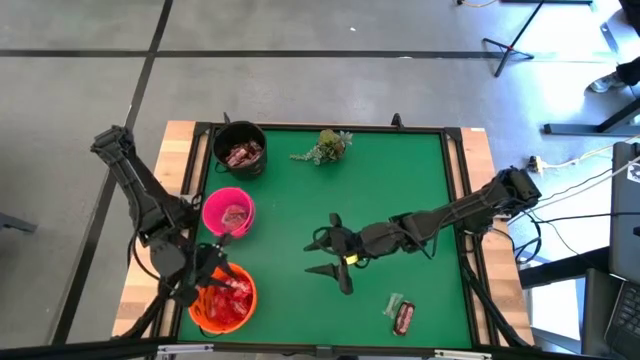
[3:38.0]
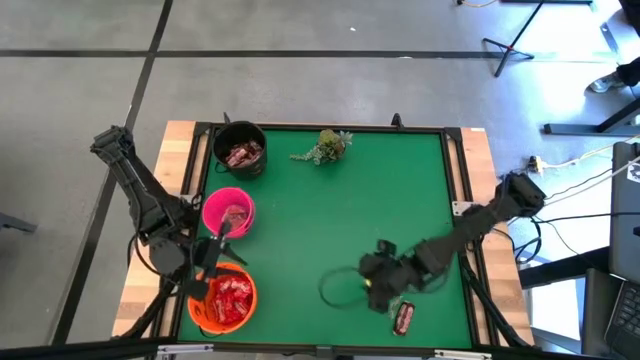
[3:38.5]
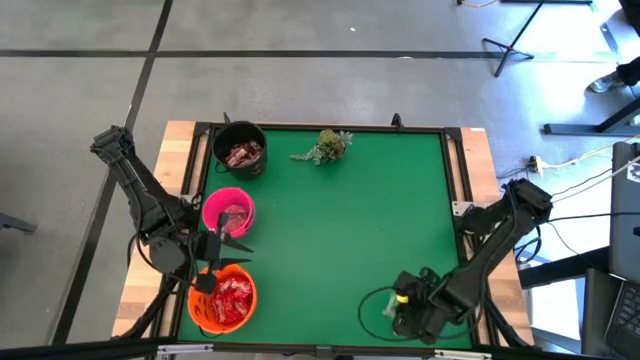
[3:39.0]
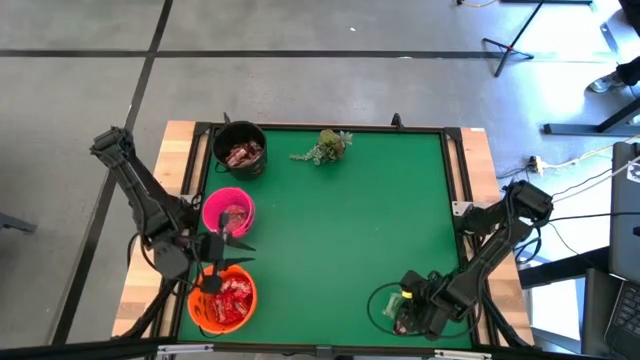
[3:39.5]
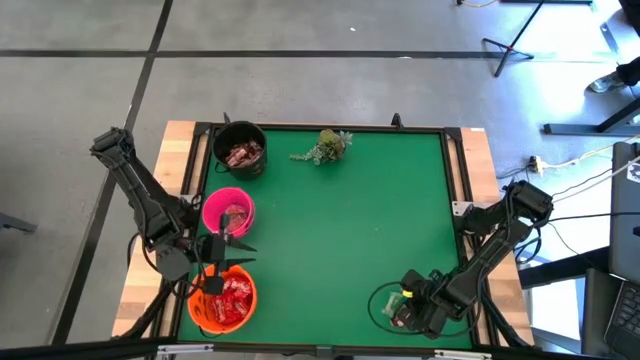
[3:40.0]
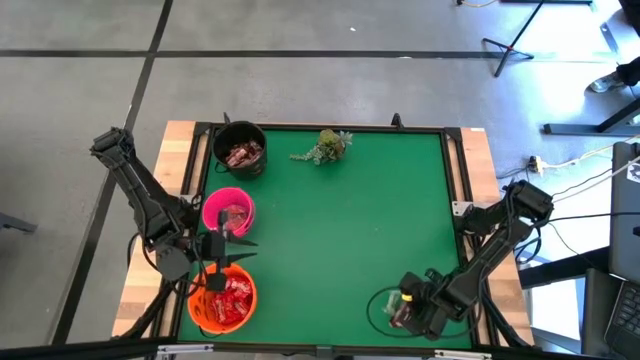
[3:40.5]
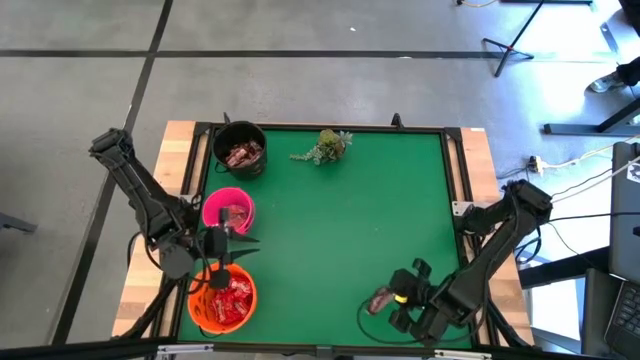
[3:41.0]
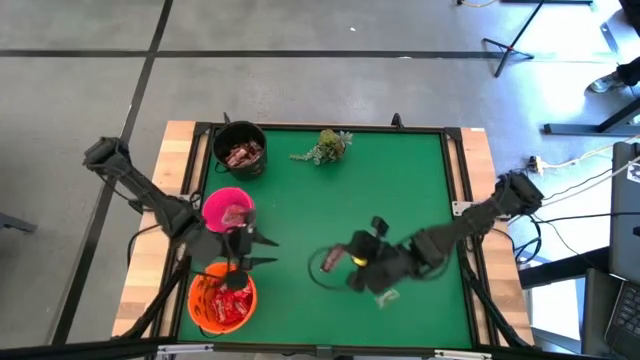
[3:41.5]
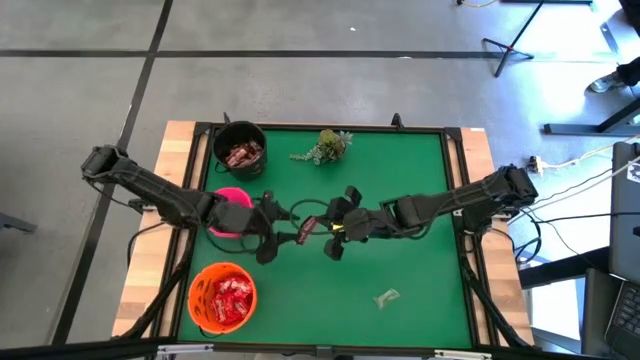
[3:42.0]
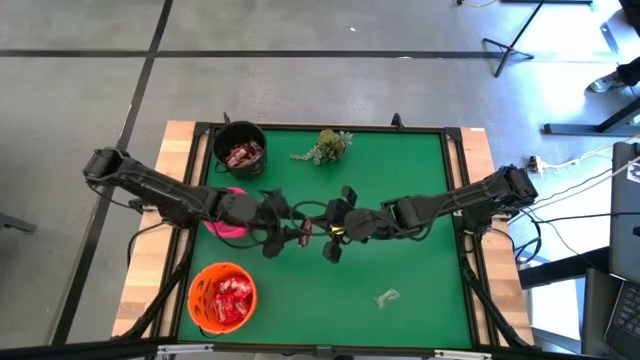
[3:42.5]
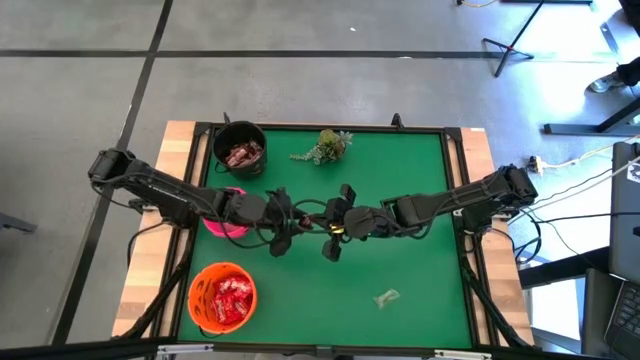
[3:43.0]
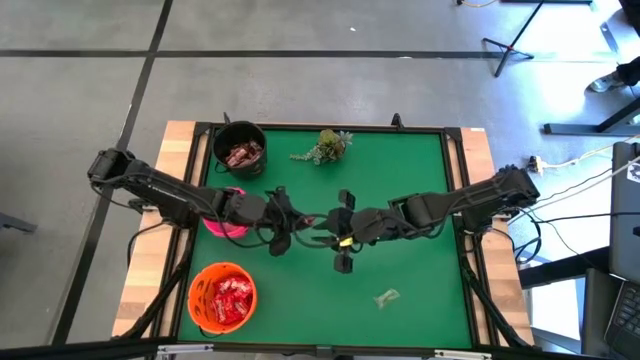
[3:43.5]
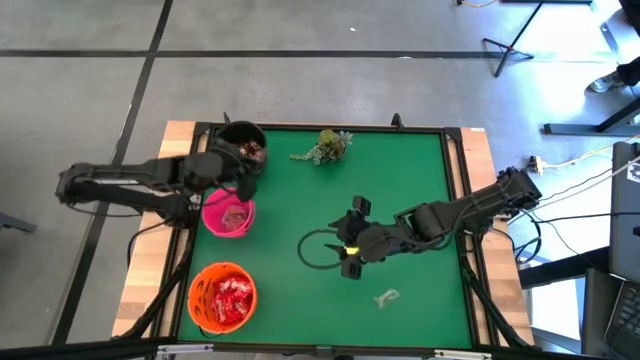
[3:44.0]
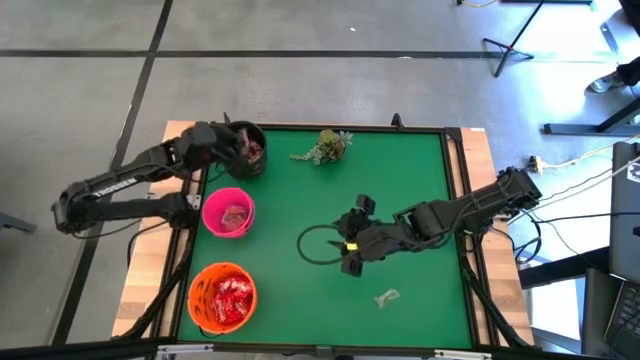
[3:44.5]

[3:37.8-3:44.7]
Task: Sort candy
Put the brown chocolate into the black bucket

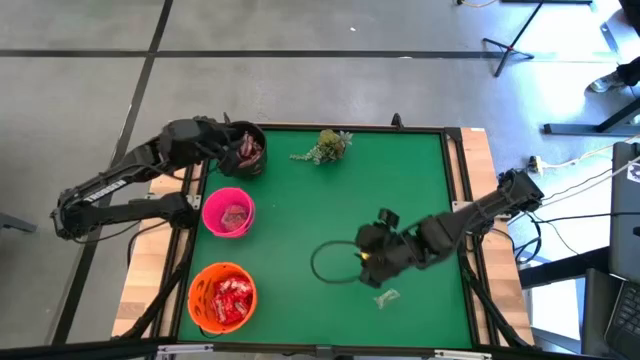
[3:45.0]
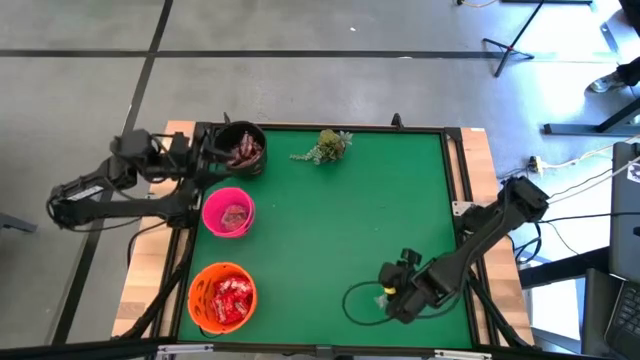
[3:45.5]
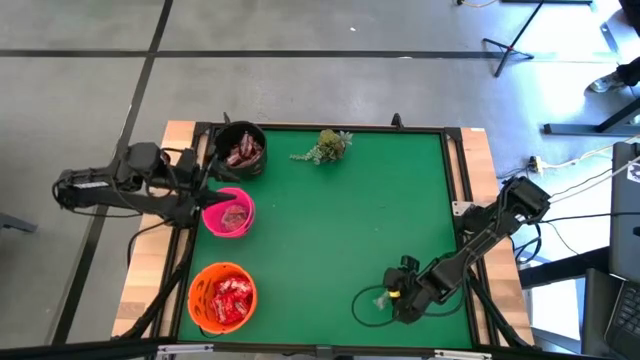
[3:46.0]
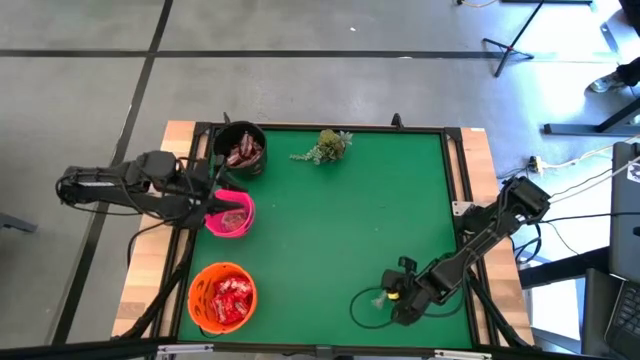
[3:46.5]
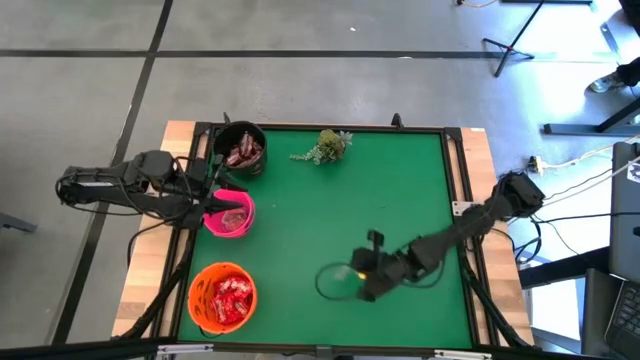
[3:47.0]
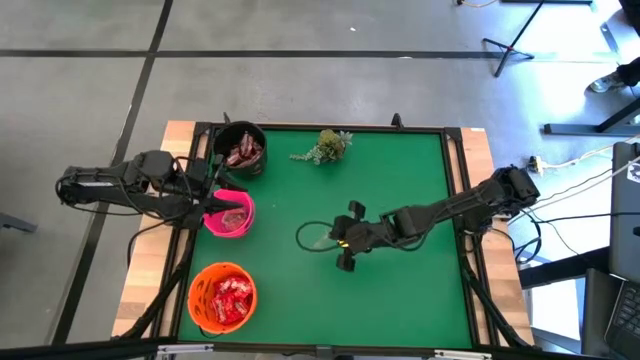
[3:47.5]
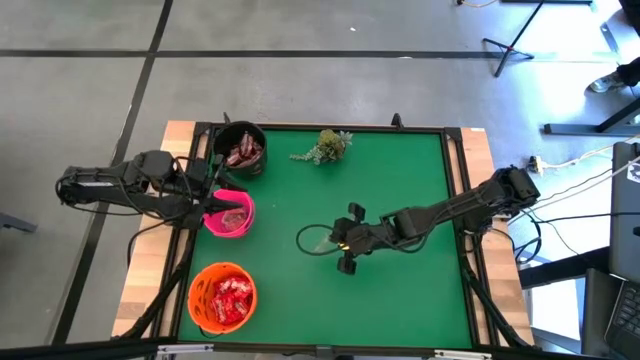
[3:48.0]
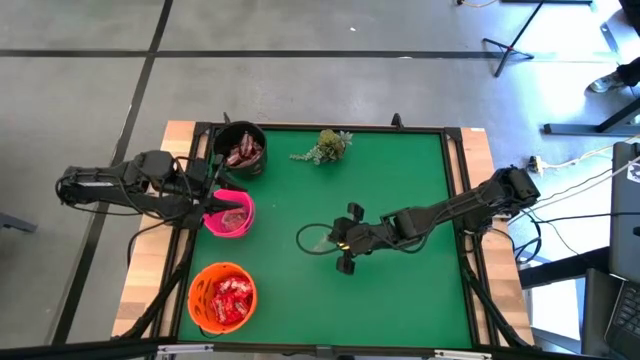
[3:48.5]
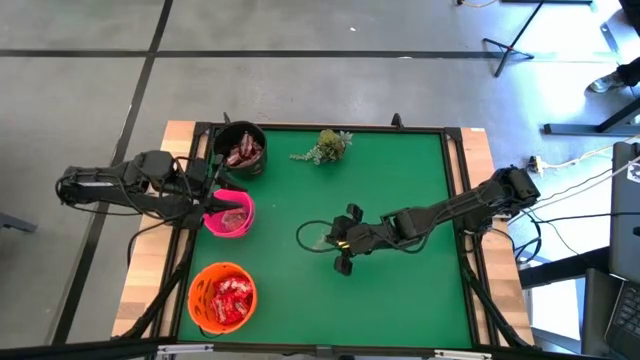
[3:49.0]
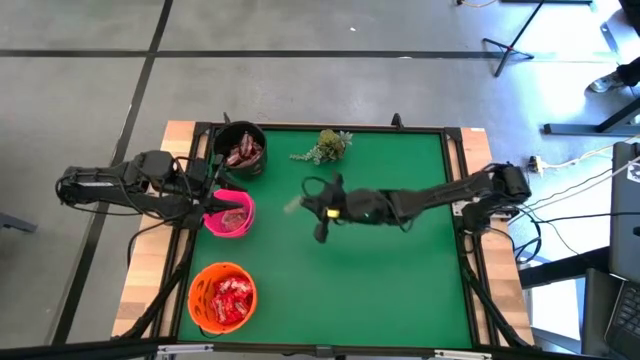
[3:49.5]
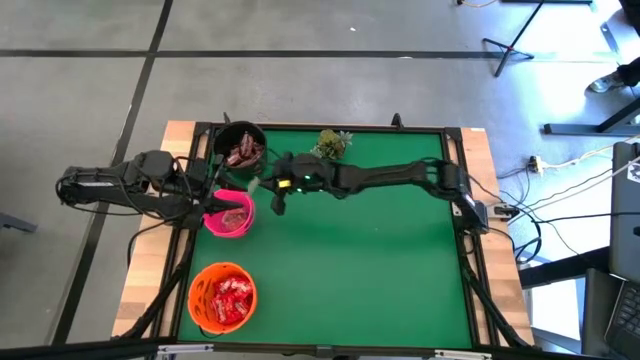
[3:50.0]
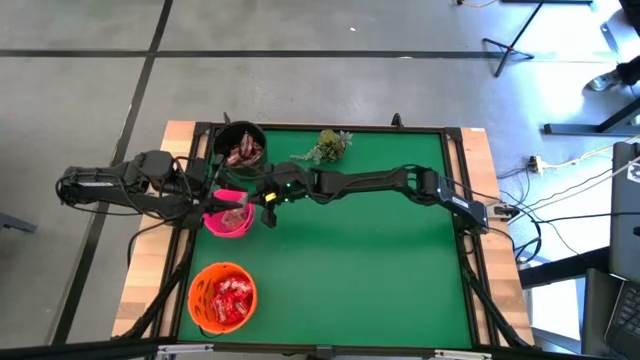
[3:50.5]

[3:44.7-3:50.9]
Put the green gummy into the pink bucket

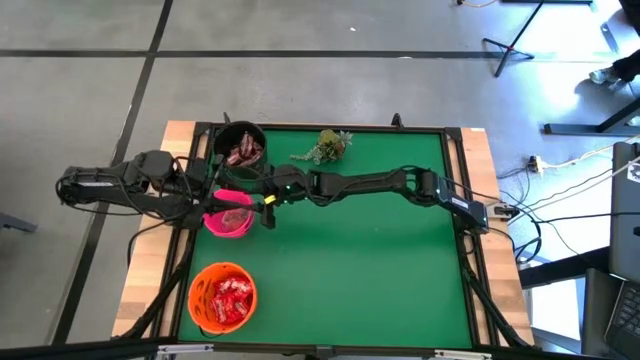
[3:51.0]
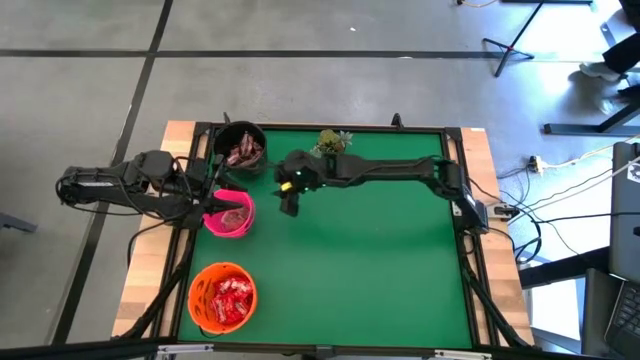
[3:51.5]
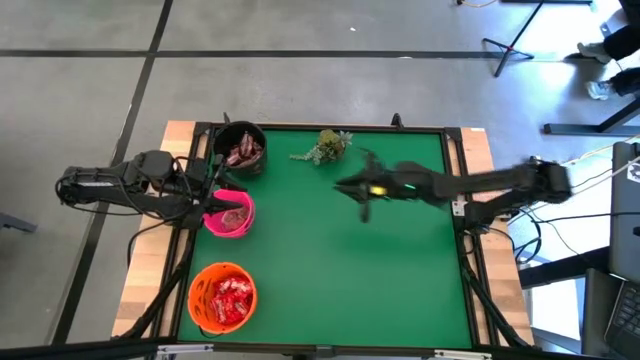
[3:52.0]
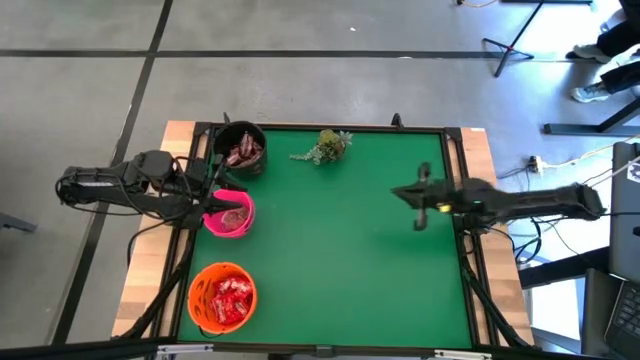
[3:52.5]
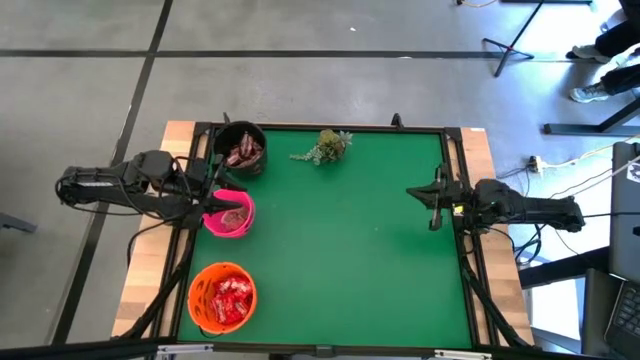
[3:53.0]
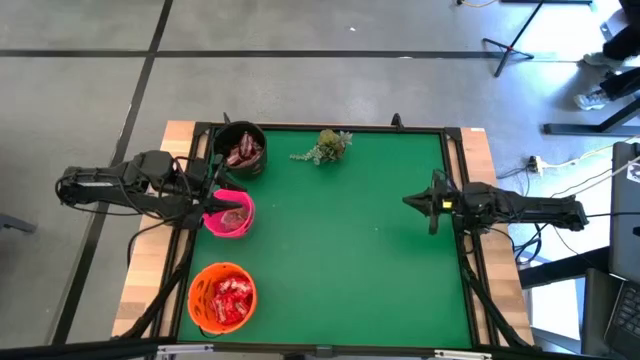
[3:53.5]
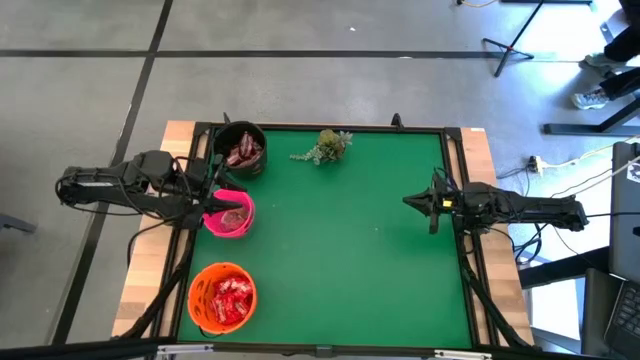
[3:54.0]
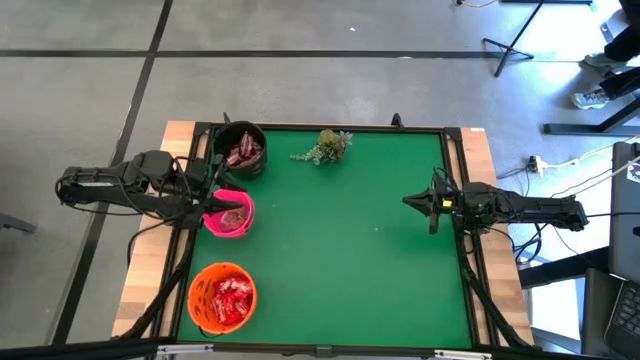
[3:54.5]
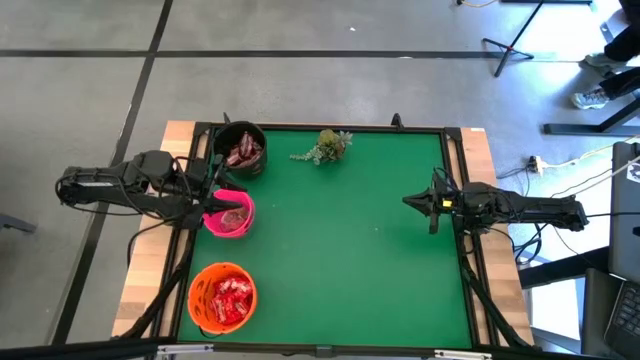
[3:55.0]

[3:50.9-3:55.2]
Return to Home Position

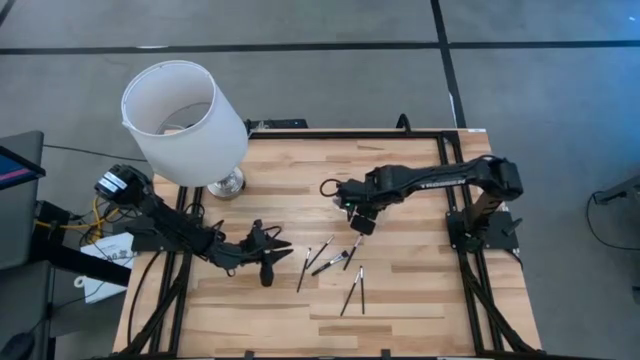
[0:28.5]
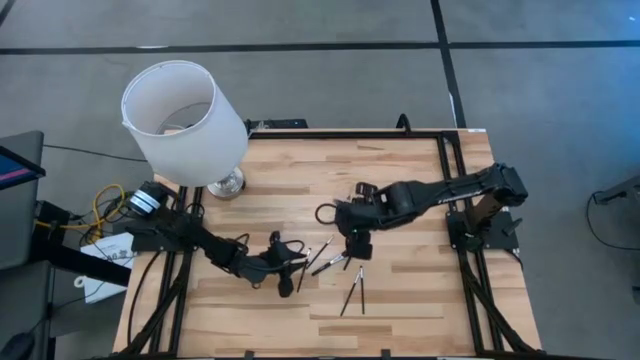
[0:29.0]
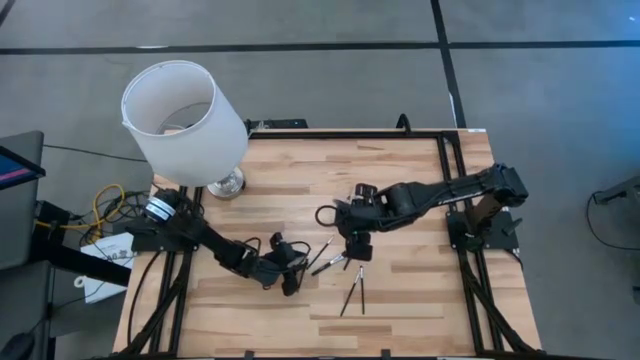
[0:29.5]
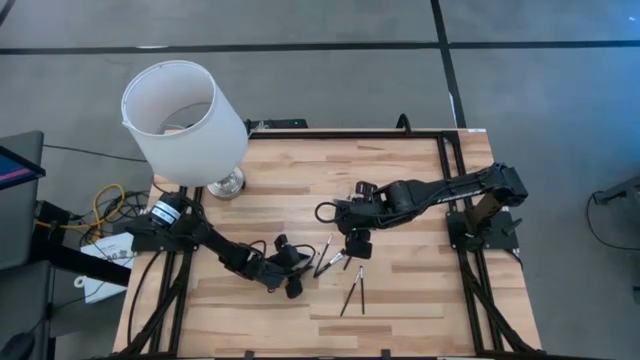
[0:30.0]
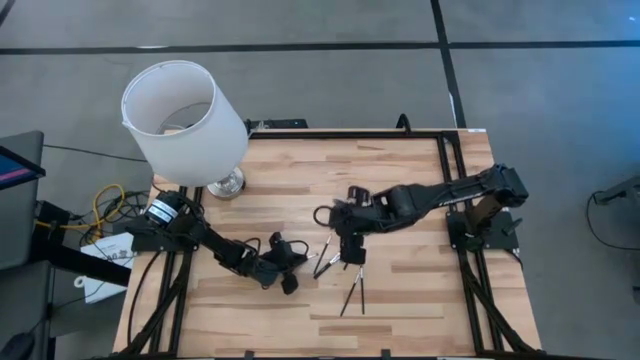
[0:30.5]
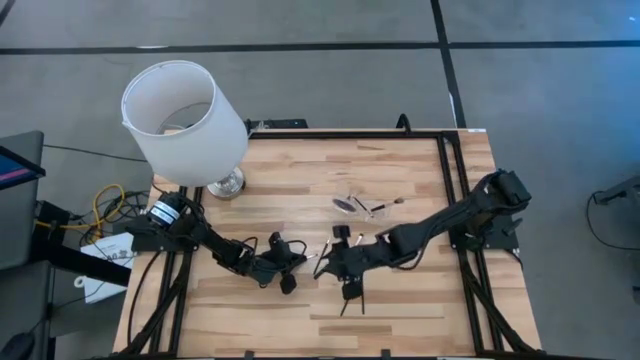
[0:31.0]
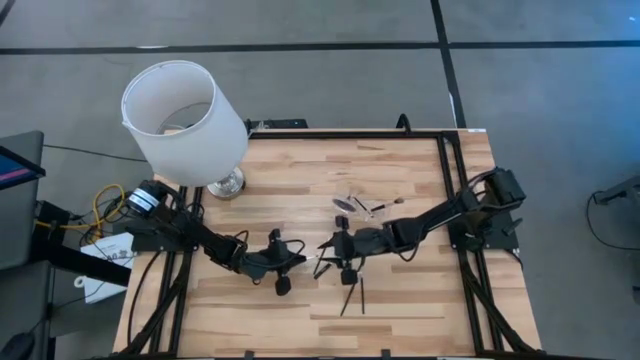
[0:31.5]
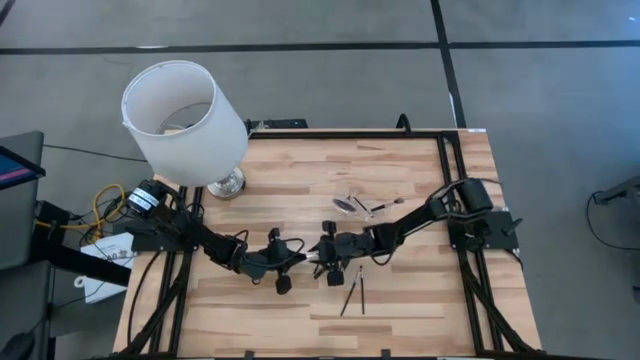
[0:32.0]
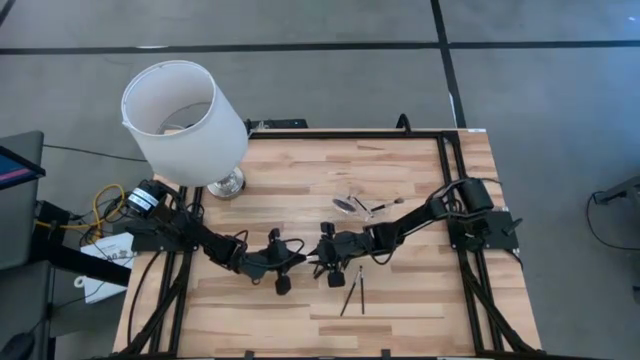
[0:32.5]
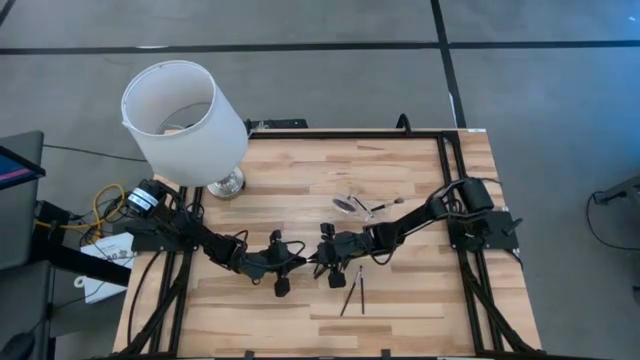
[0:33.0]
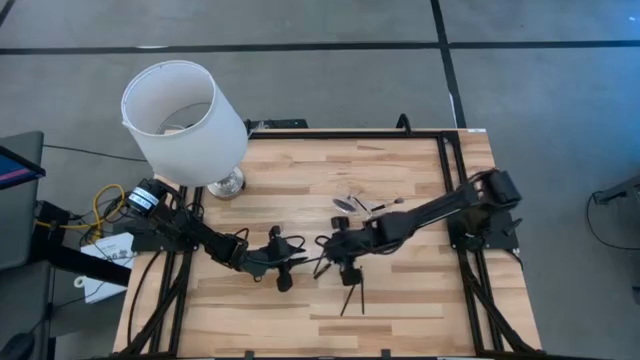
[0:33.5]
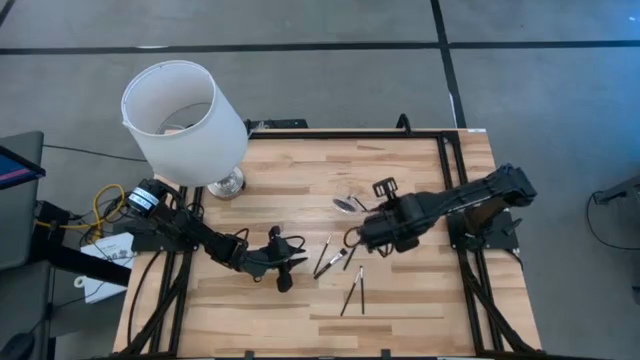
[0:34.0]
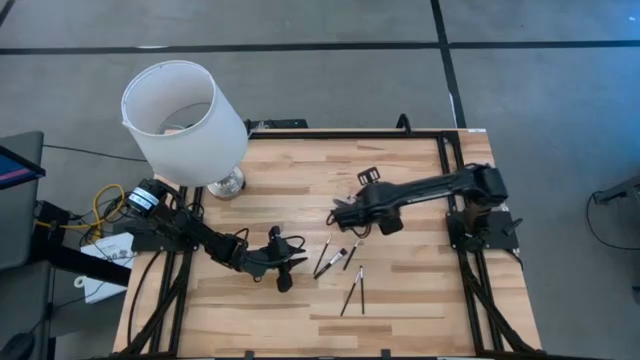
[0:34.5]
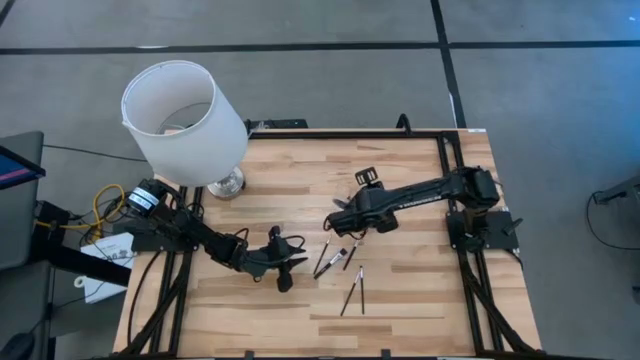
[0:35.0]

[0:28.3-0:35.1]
Task: Put items in baskets/containers
Put the black eyeshadow brush into the transparent organizer
